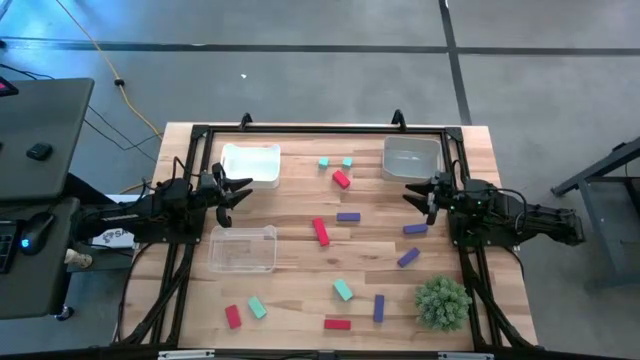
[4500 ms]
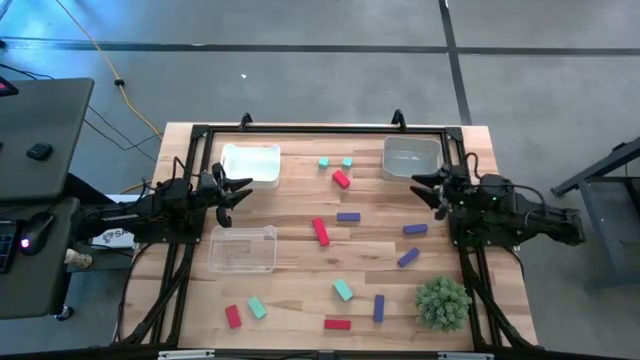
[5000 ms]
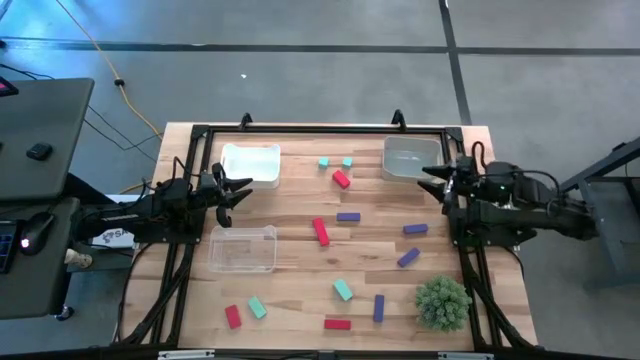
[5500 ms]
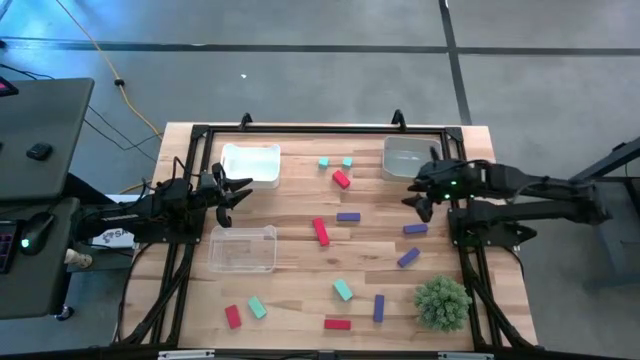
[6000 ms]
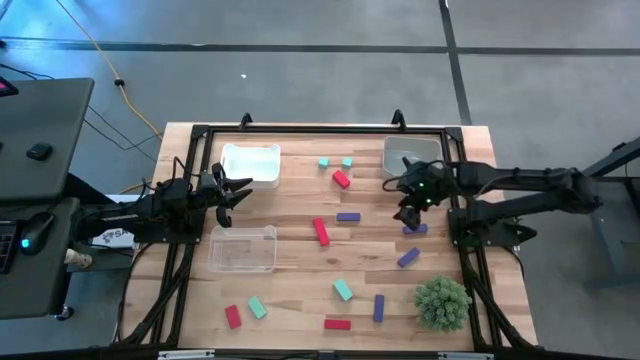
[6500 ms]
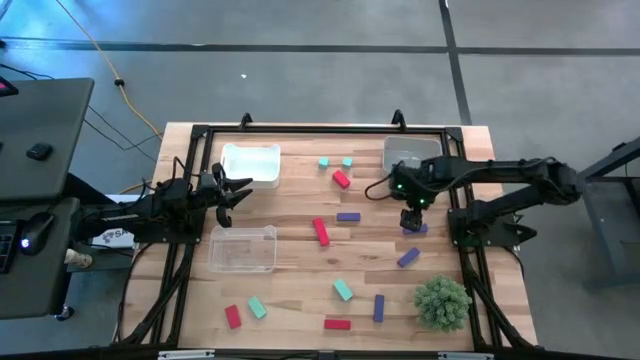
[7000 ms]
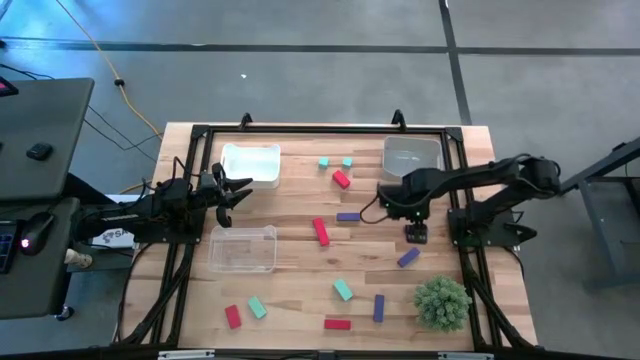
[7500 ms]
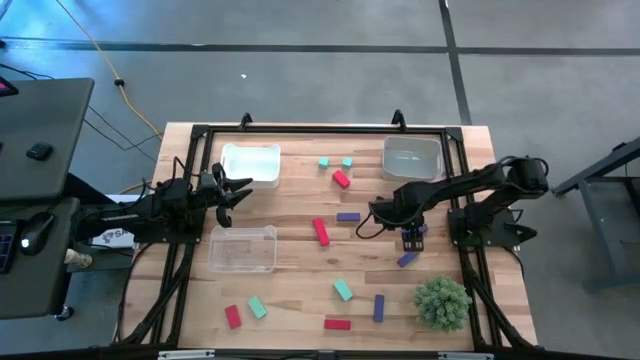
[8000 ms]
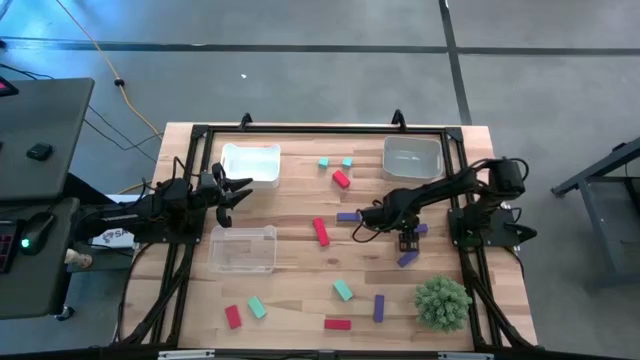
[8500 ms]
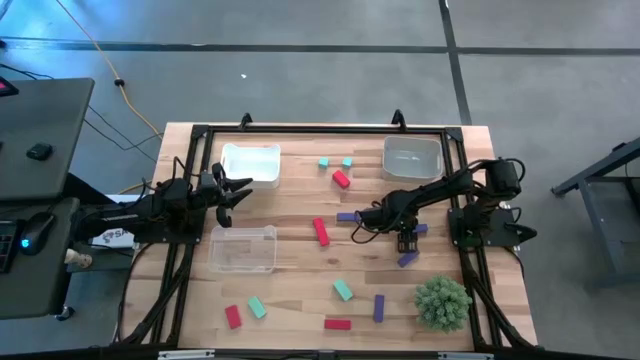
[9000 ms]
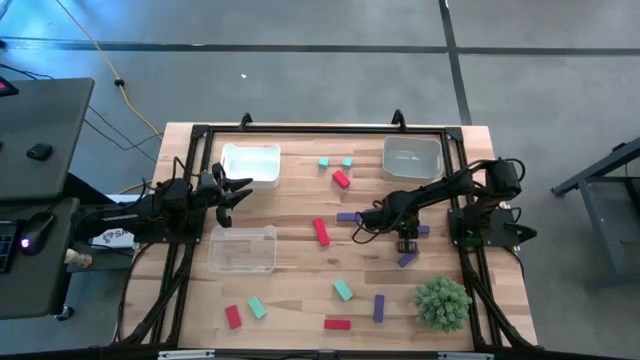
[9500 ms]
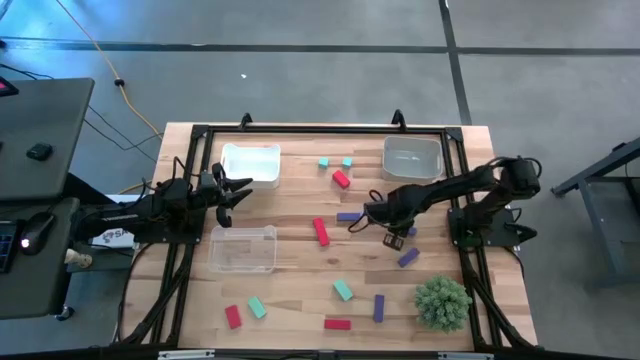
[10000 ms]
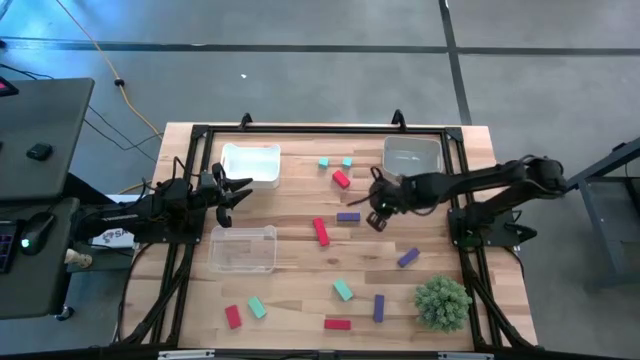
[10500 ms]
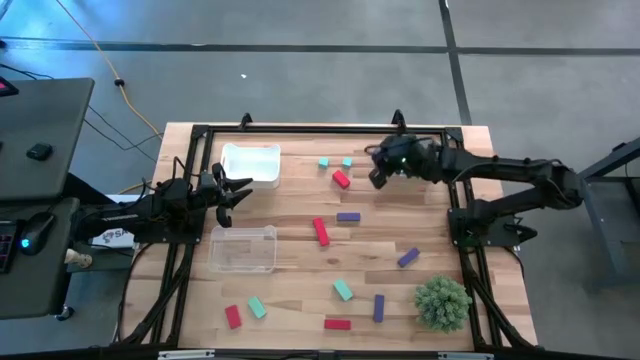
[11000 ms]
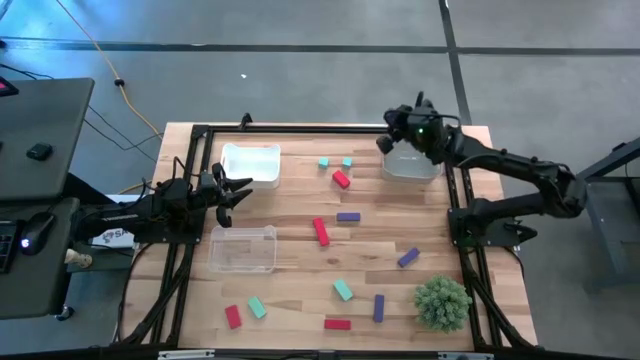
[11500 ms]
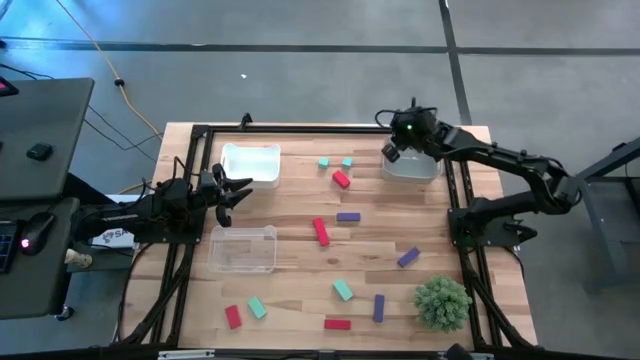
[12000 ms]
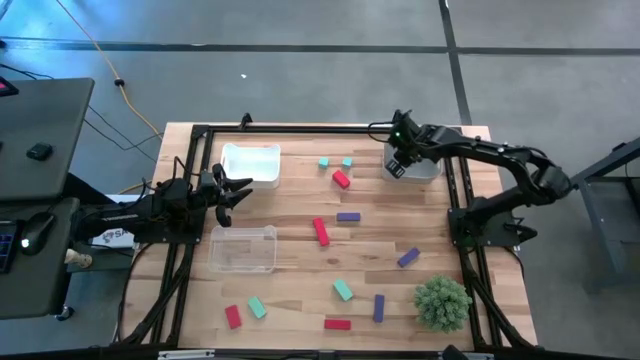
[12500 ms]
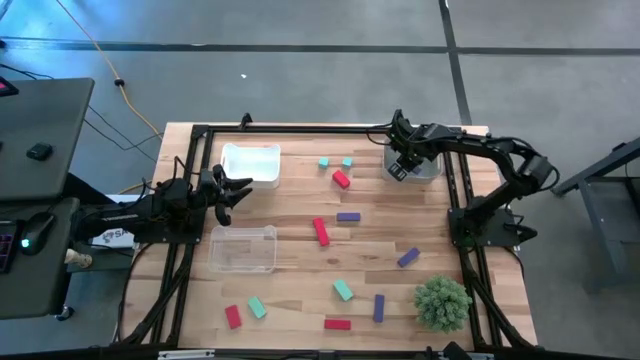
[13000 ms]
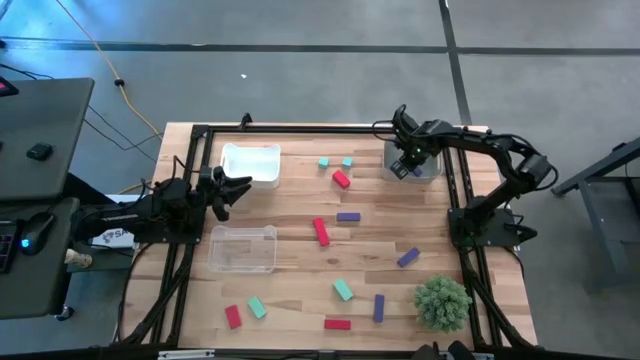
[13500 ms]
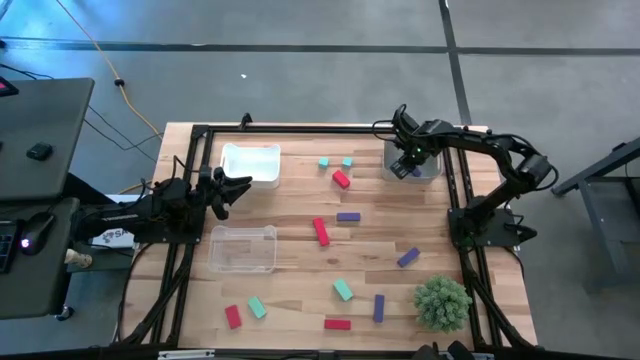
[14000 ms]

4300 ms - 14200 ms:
Task: Sort & place blocks by color
Put the top right violet block into the gray bin

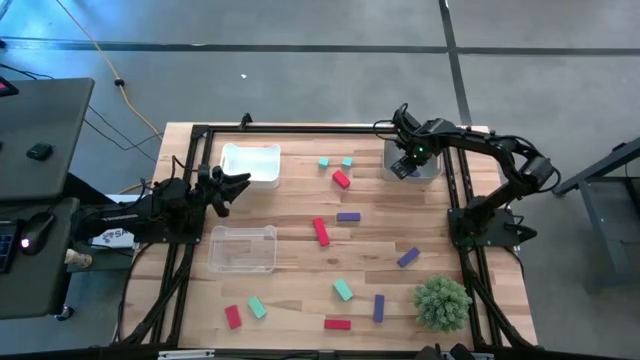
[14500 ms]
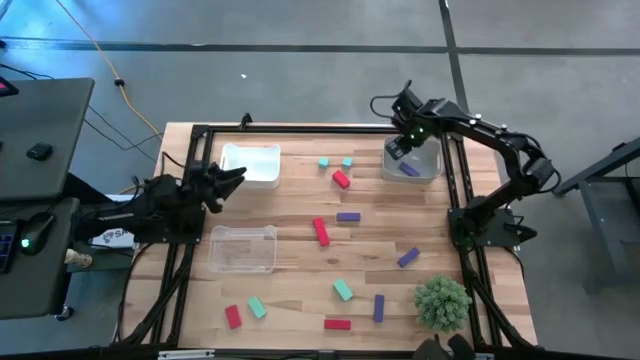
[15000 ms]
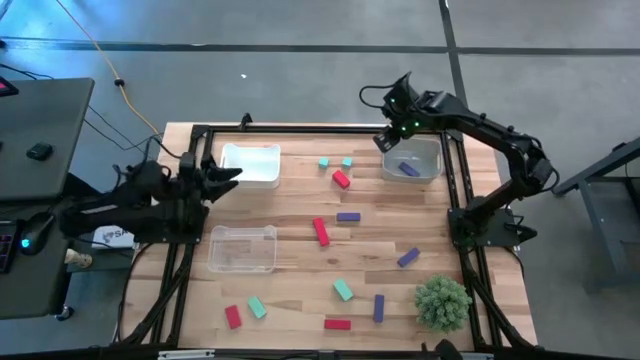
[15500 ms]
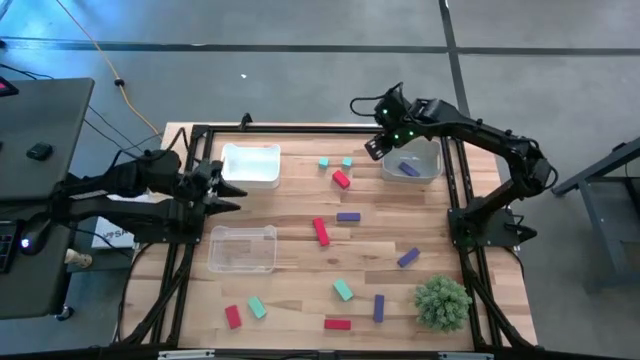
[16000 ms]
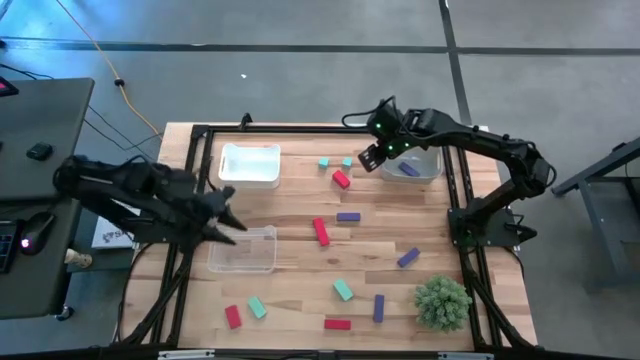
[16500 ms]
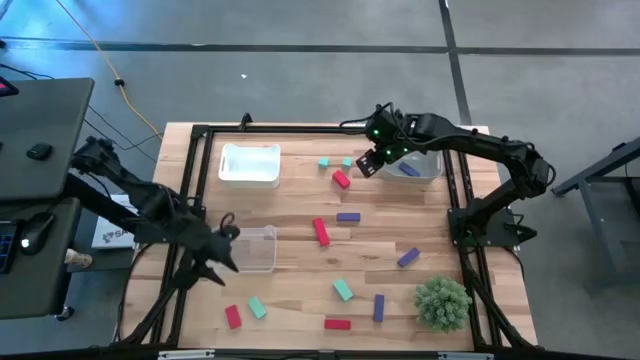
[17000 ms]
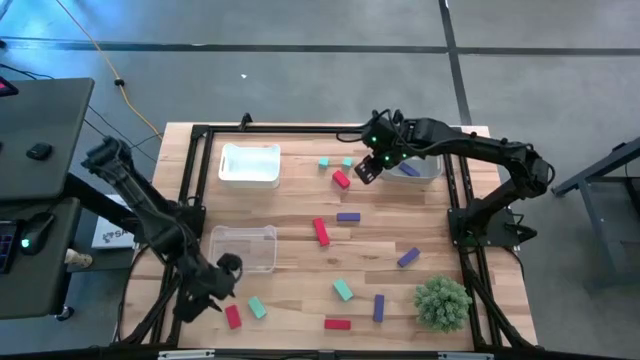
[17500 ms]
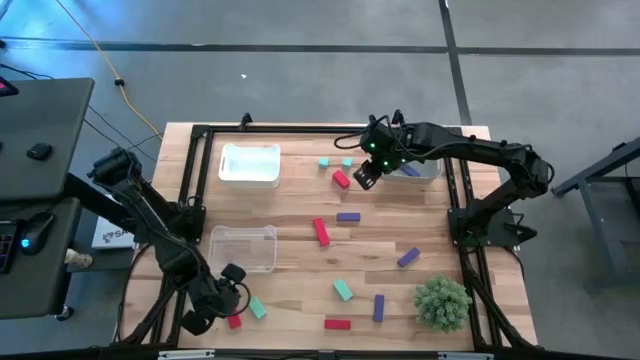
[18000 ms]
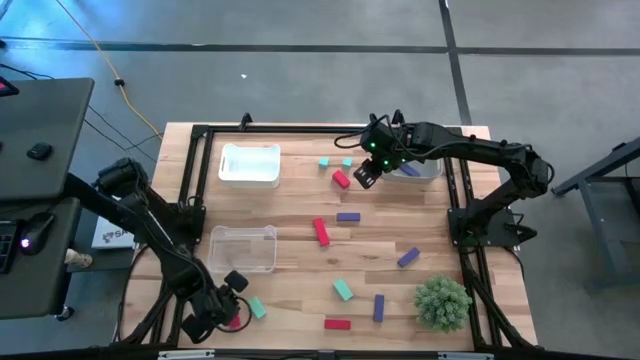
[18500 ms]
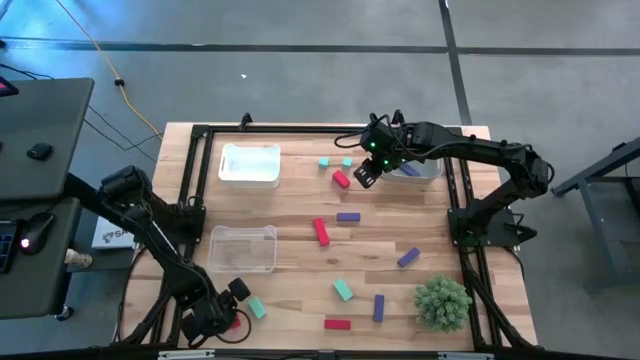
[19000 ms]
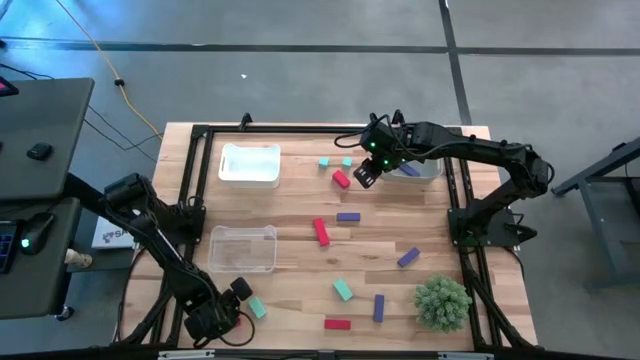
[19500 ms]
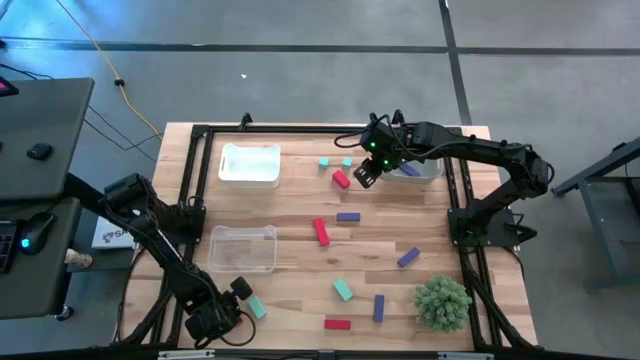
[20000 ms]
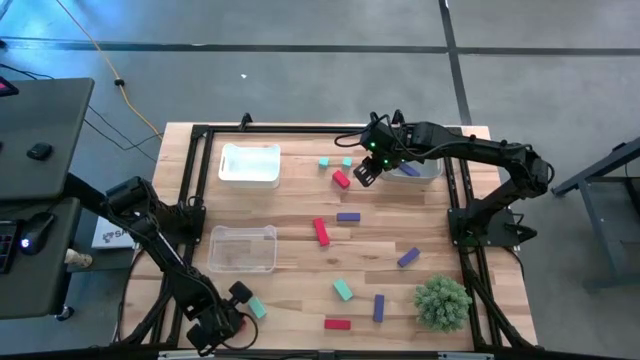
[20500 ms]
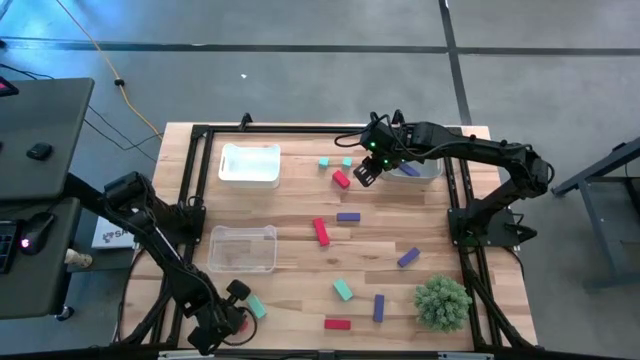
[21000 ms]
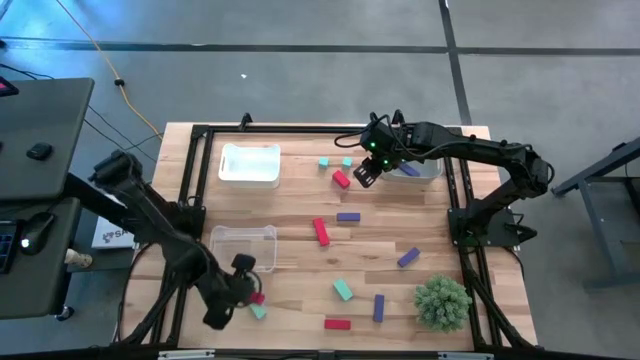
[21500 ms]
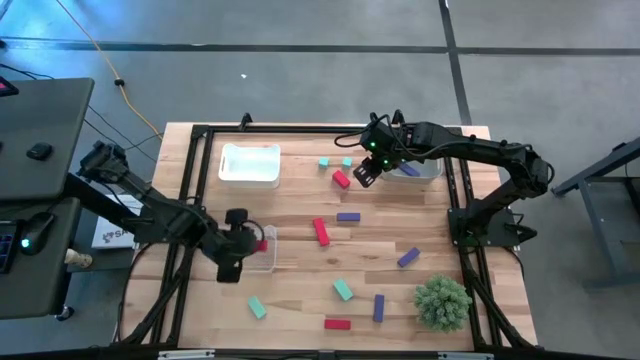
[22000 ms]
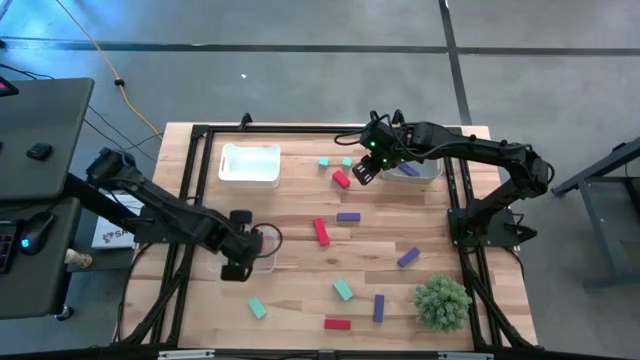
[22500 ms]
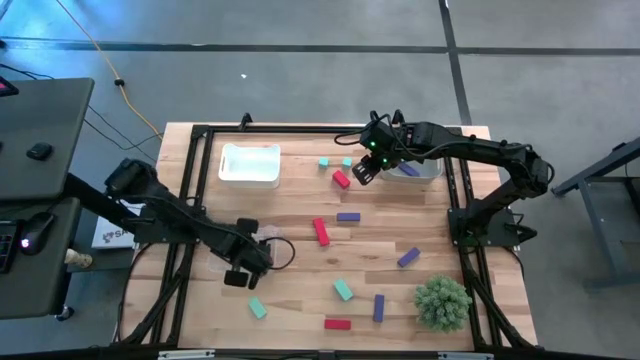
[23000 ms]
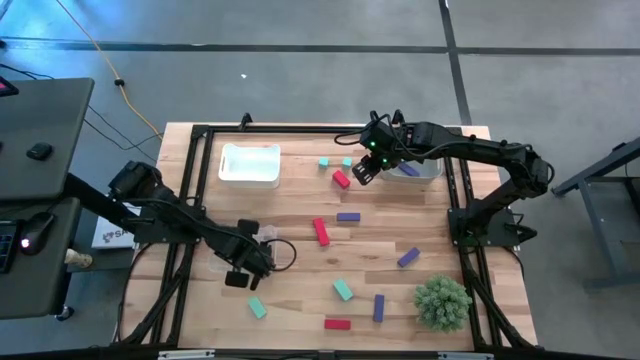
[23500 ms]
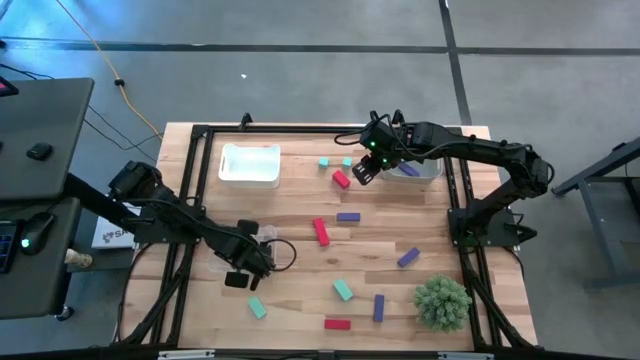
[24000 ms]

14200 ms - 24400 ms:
Put the bottom left red block into the transparent bin

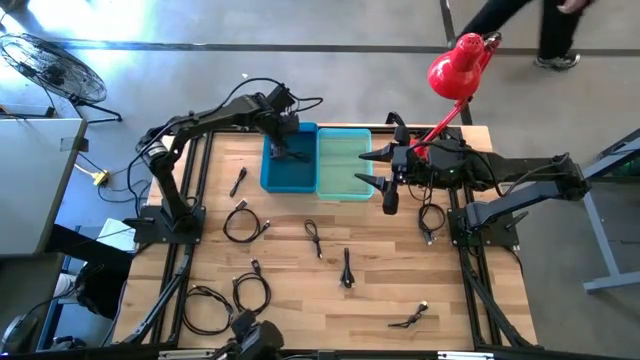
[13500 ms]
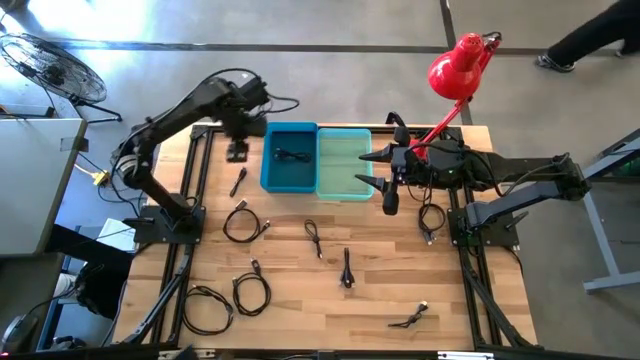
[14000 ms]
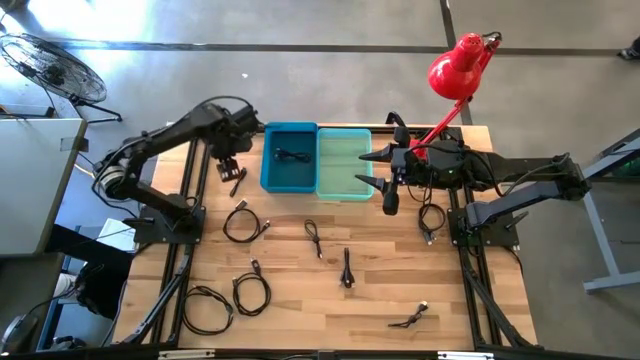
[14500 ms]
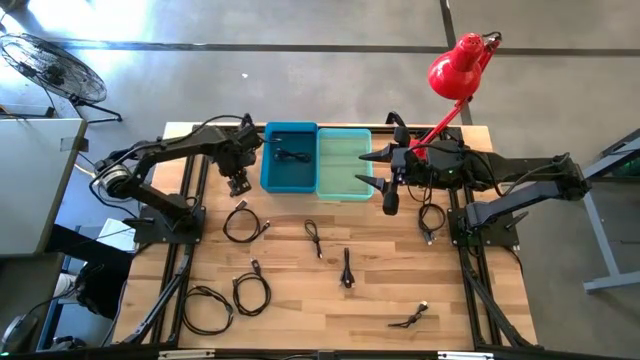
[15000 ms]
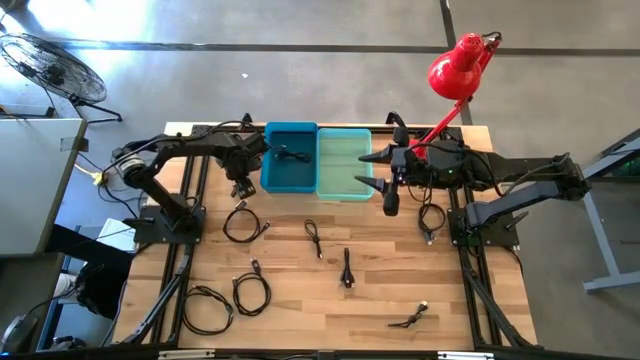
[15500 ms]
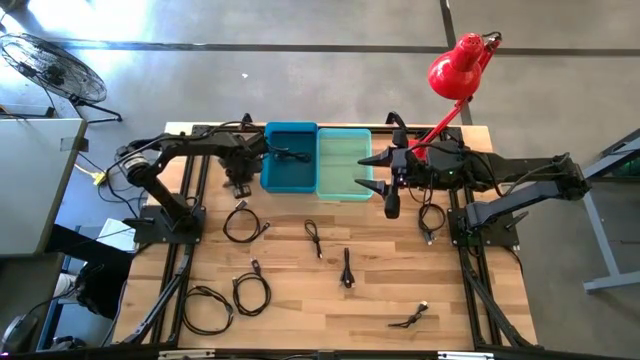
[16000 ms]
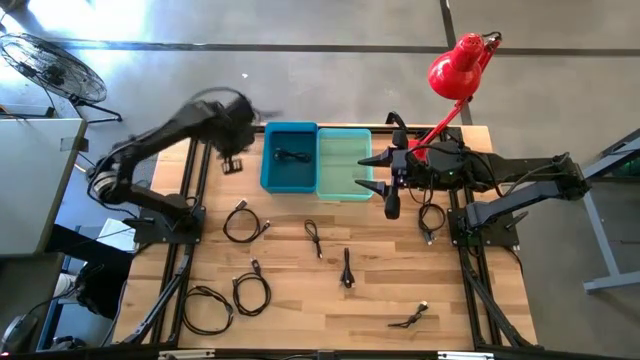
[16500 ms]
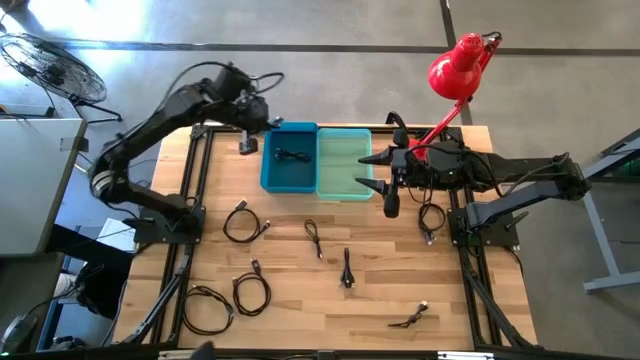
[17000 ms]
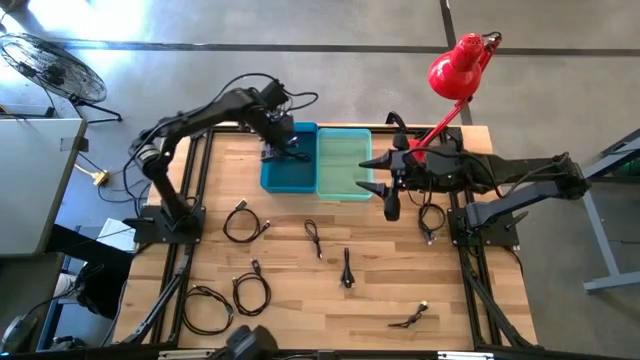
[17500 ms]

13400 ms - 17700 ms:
Task: Pick & Place USB Port
Put the black USB cable into the blue bin
